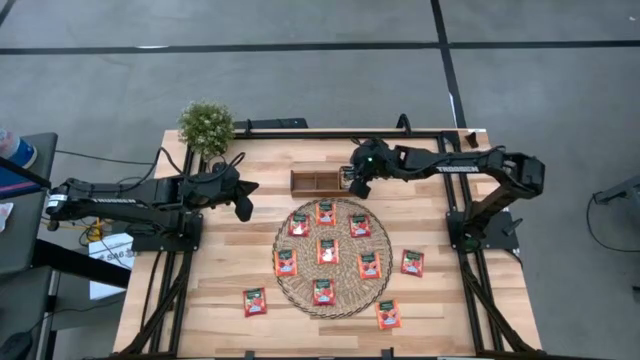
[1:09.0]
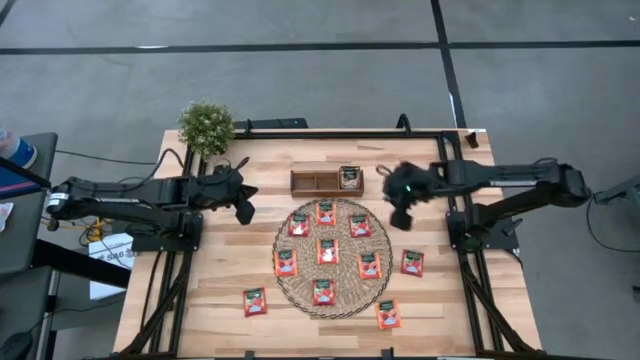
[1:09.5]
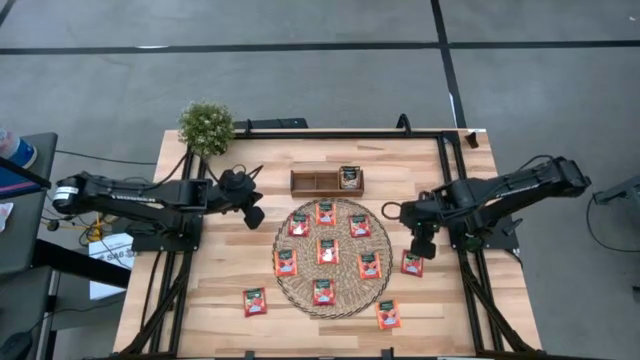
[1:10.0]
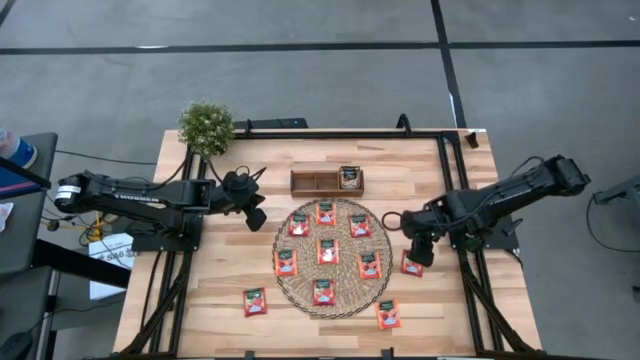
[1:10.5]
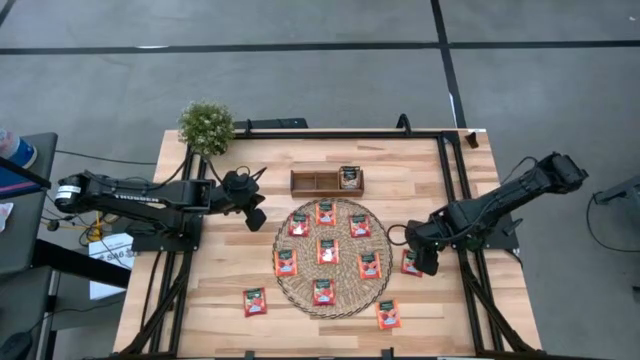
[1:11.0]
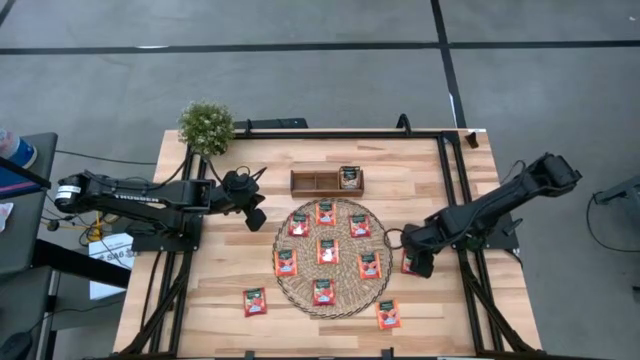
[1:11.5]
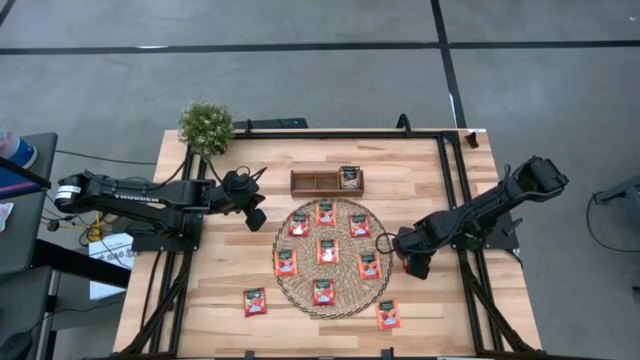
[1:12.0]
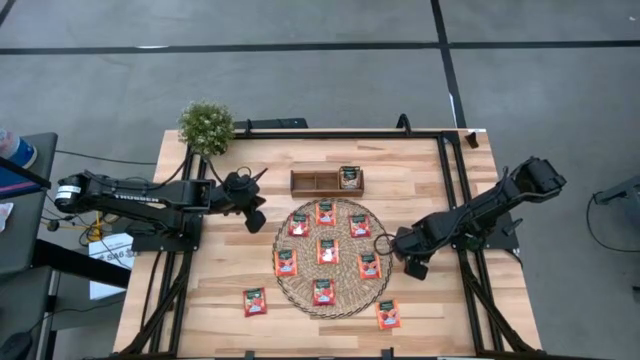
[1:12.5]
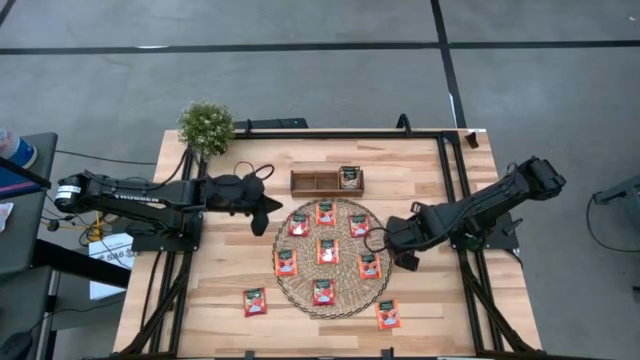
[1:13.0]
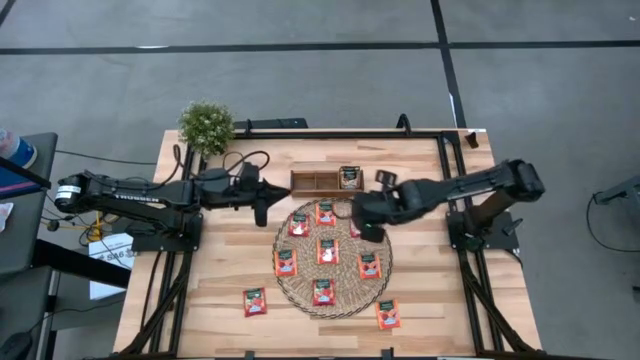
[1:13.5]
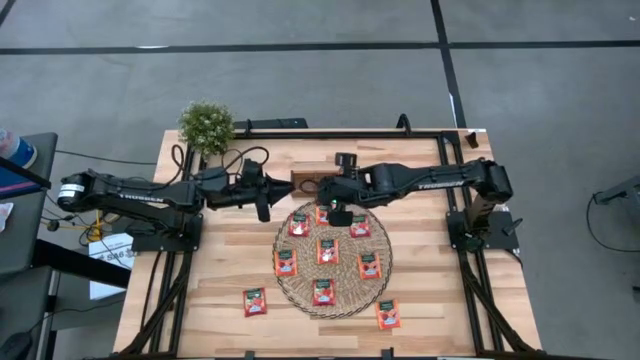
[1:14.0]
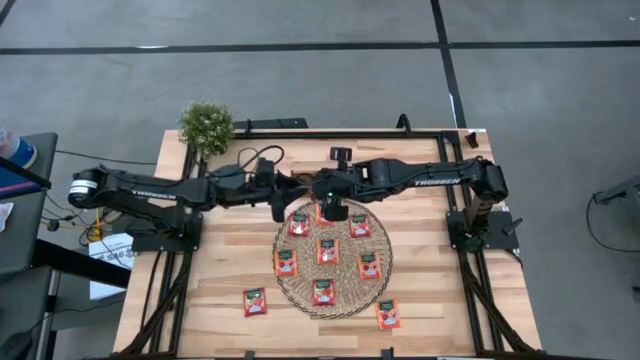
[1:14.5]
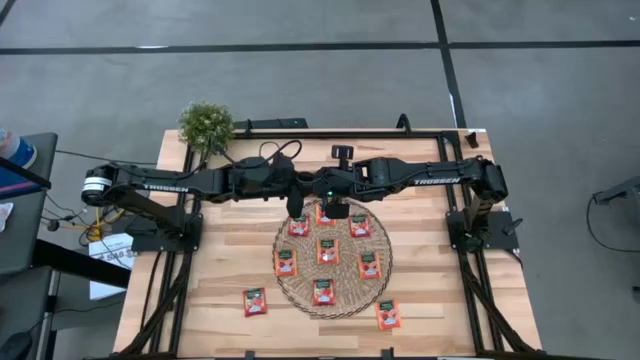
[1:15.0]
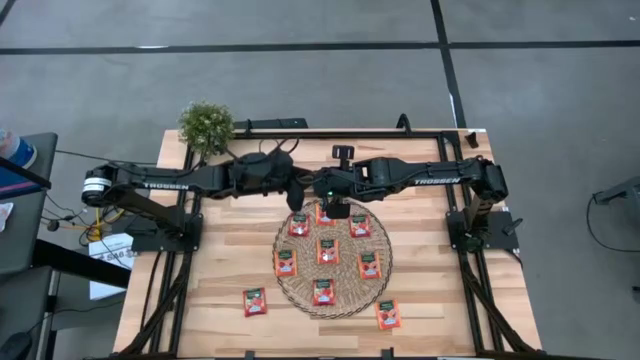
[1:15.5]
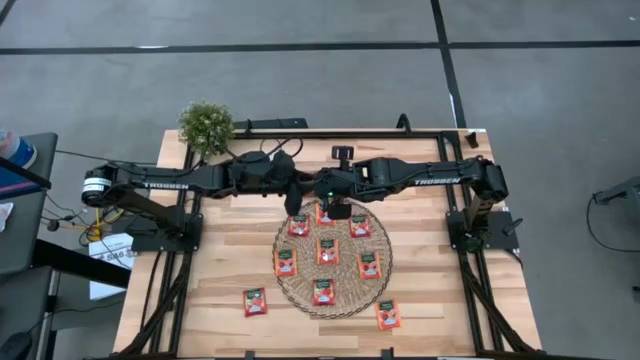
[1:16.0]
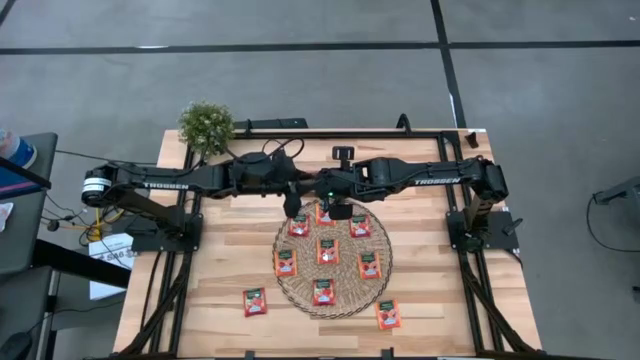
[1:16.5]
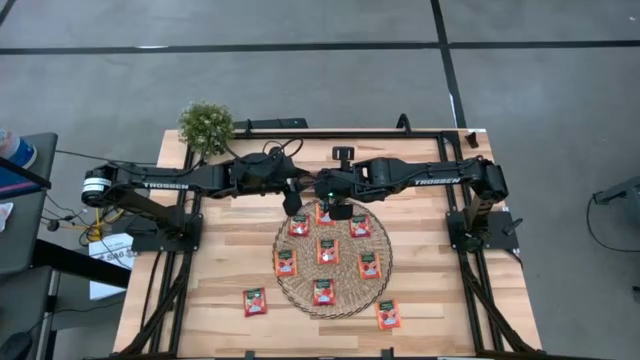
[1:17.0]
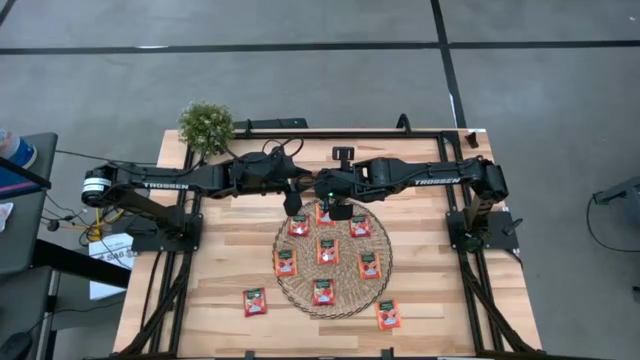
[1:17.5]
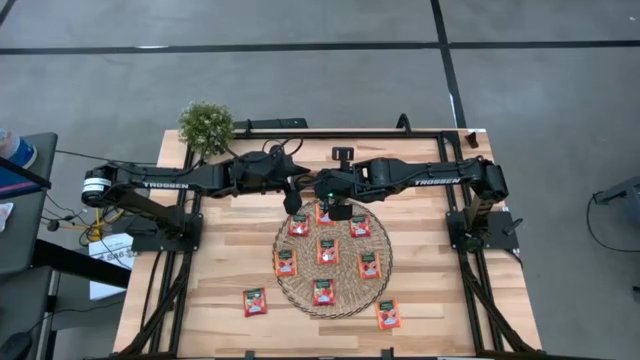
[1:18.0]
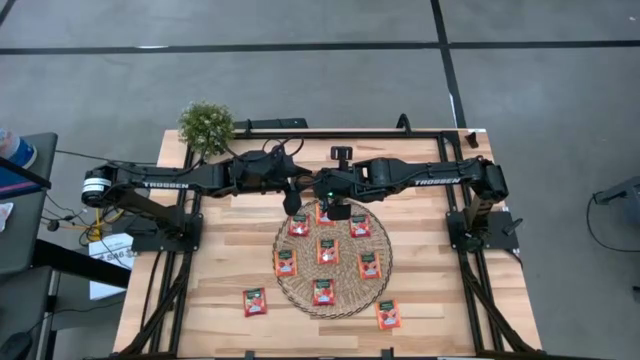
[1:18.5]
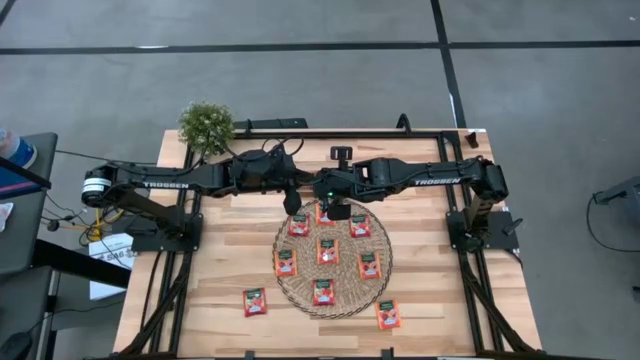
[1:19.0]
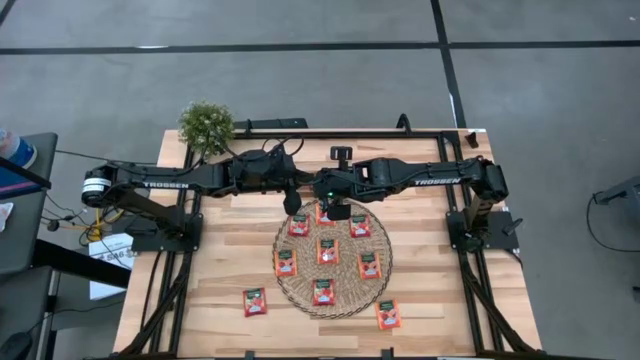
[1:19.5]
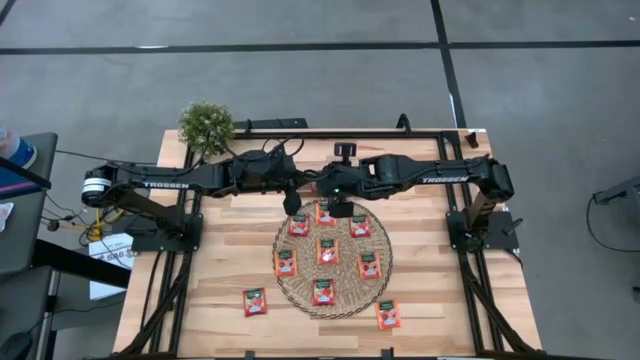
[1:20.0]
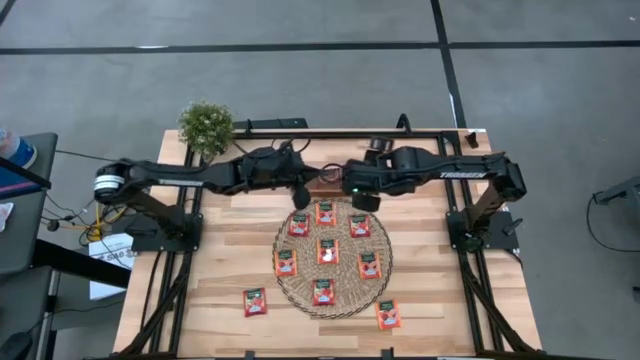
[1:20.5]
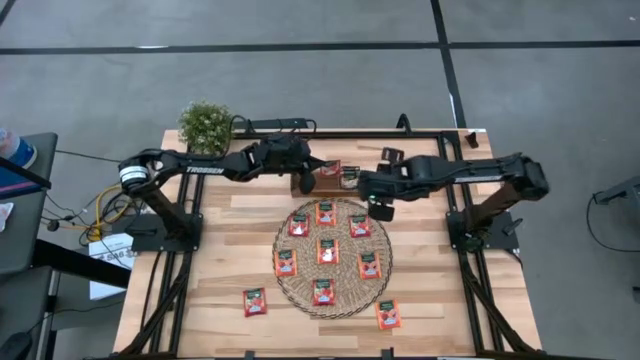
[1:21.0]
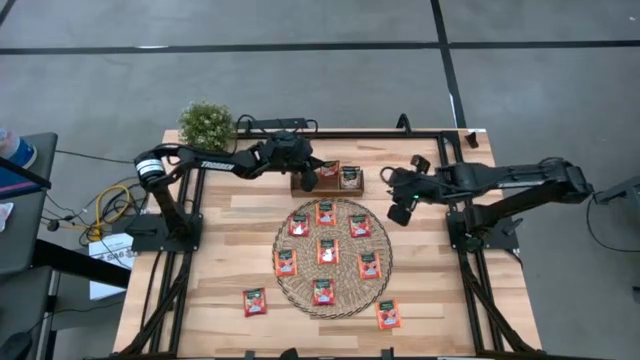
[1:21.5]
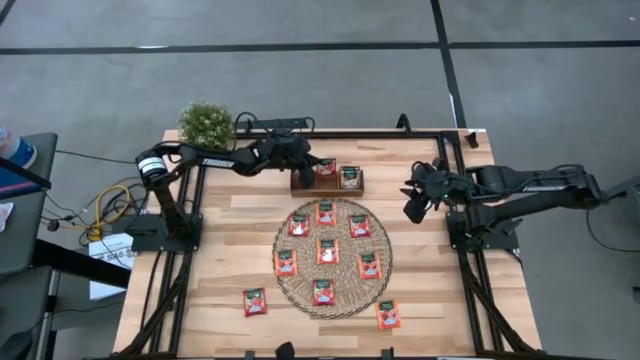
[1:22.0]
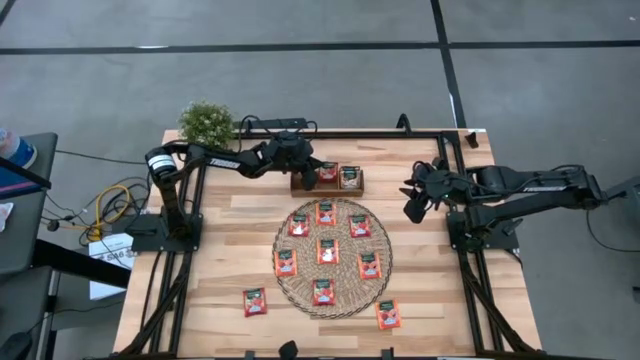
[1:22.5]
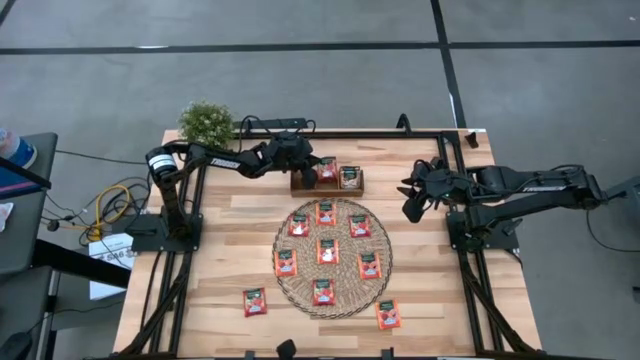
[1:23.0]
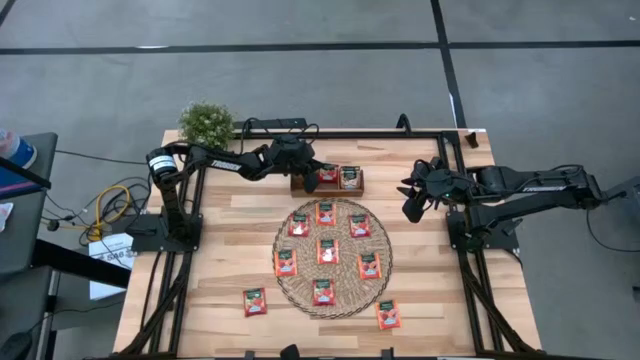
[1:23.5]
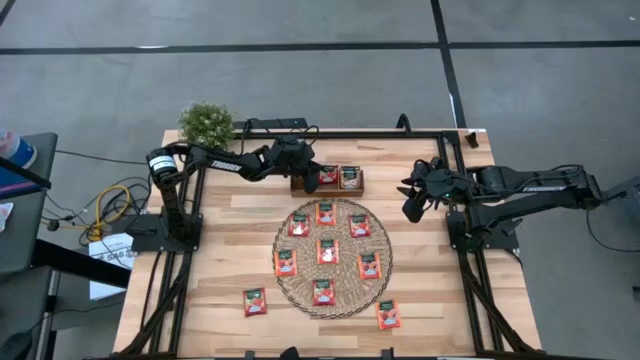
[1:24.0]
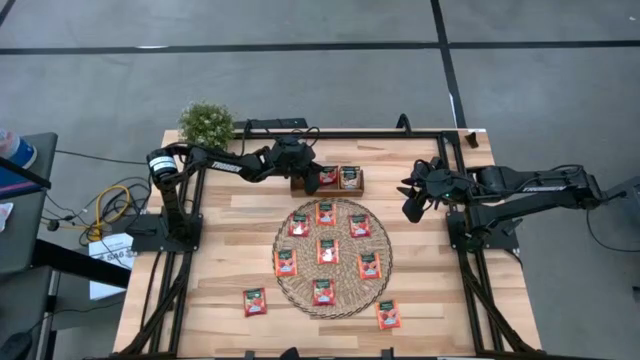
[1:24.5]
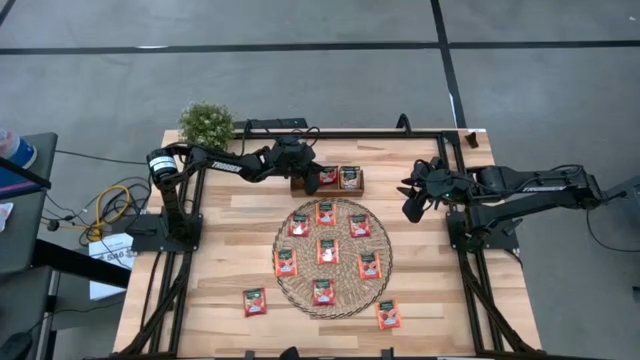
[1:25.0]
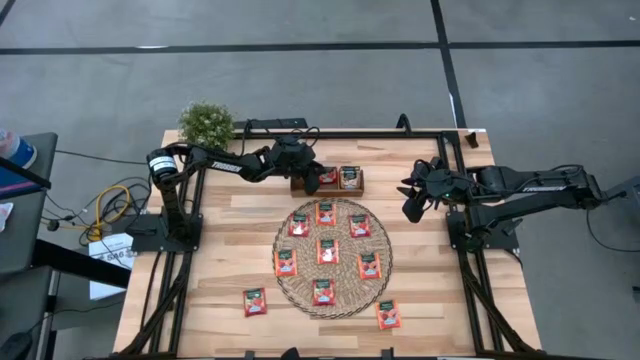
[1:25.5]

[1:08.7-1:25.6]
Task: Pick & Place Tea
Put the red tea bag into the middle section of the wooden organizer

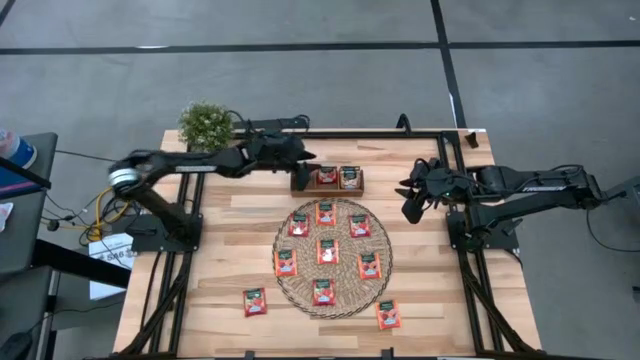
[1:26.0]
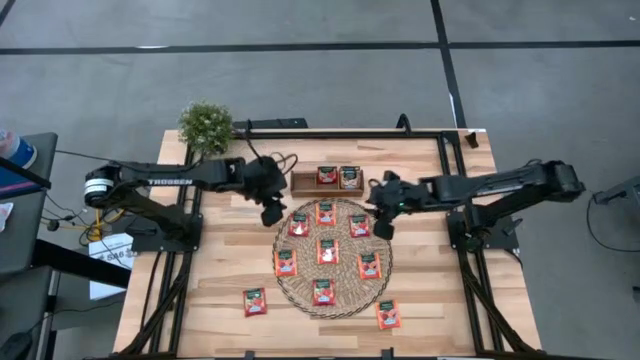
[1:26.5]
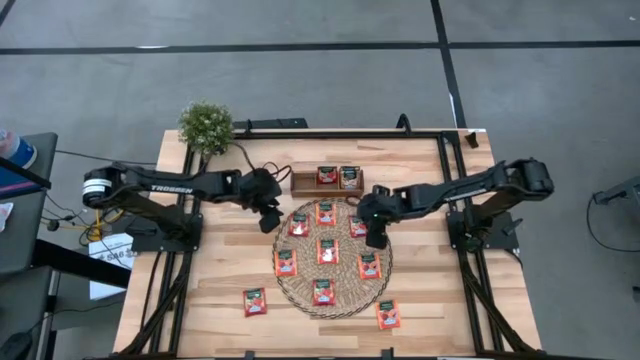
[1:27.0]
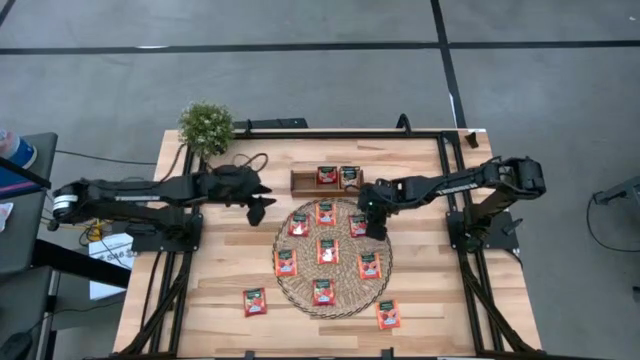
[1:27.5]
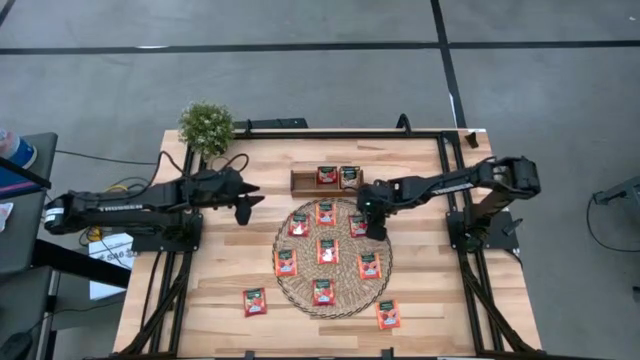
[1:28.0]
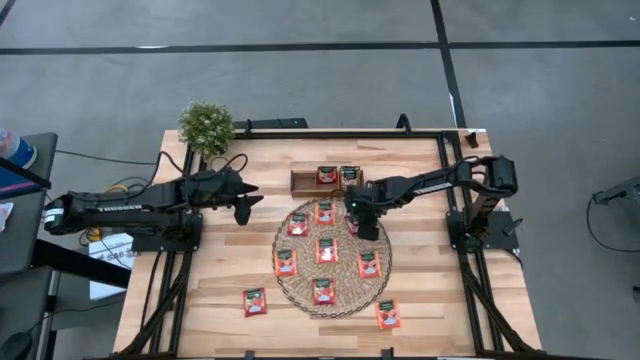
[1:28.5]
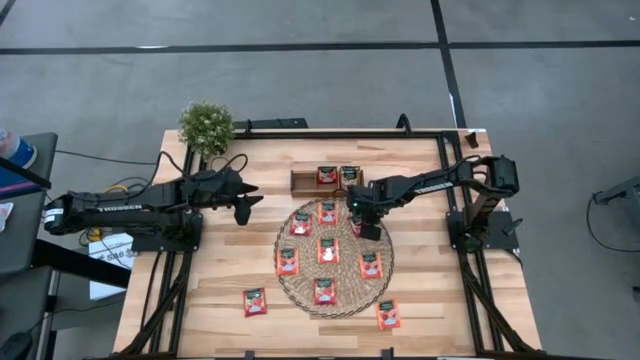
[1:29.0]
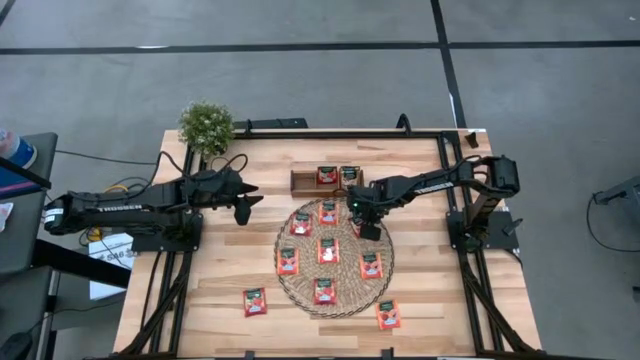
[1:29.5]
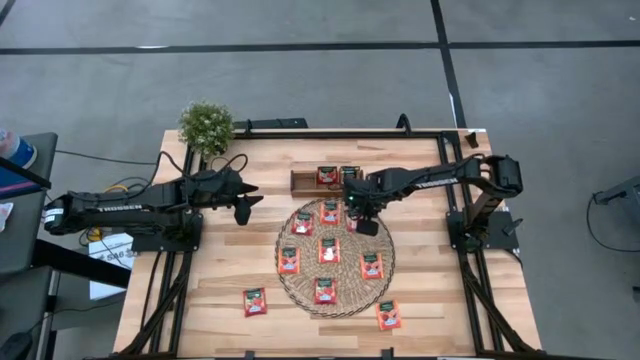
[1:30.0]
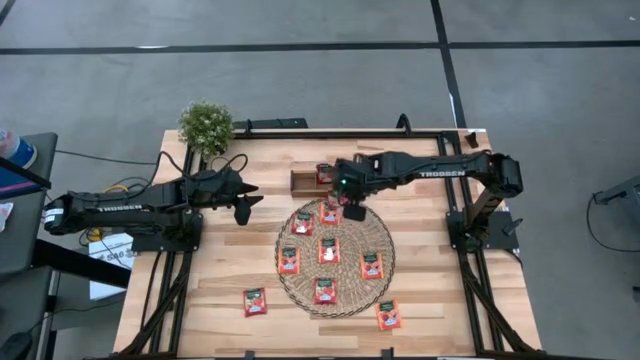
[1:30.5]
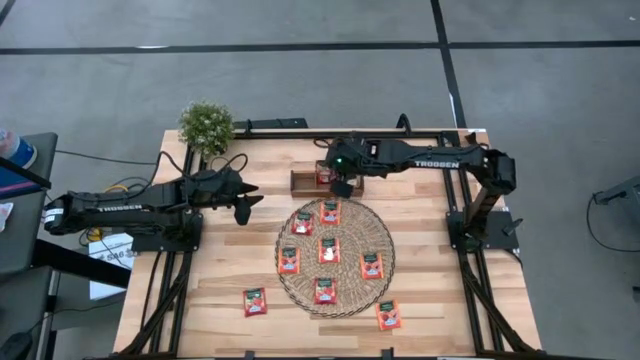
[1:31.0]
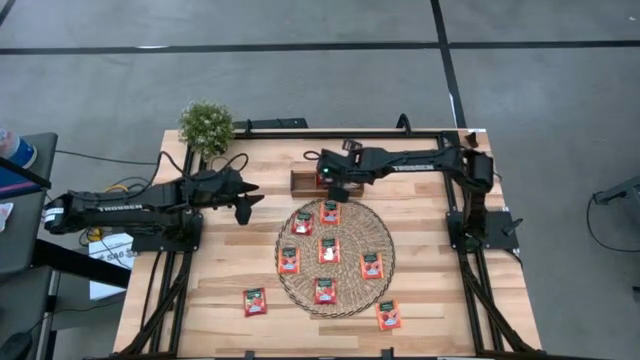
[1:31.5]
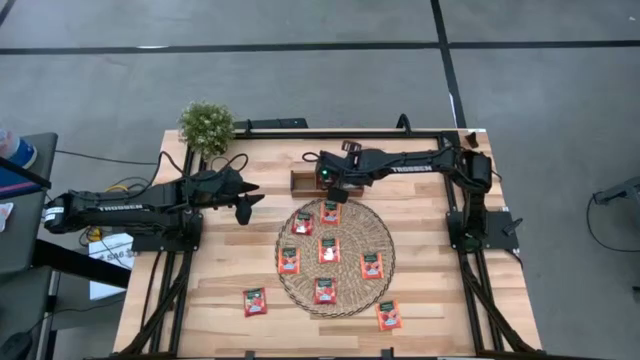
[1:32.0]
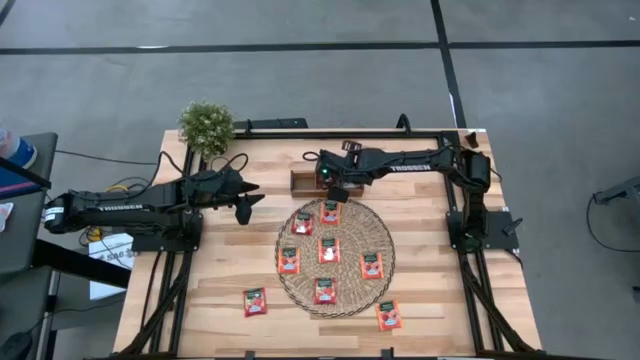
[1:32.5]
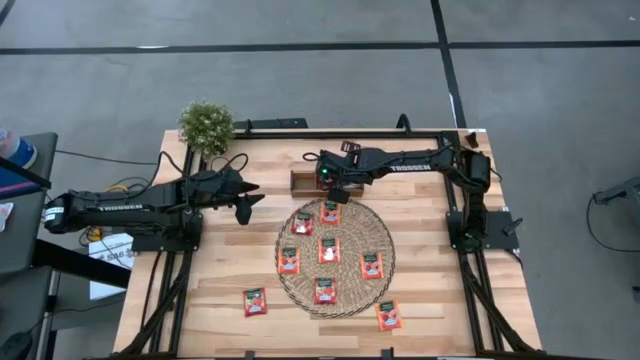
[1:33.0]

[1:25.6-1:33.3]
Put the red tea bag into the middle section of the wooden organizer
